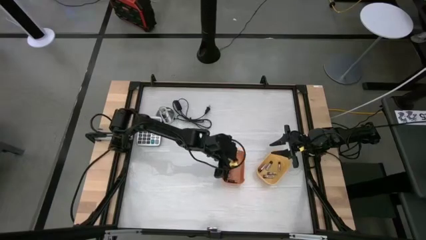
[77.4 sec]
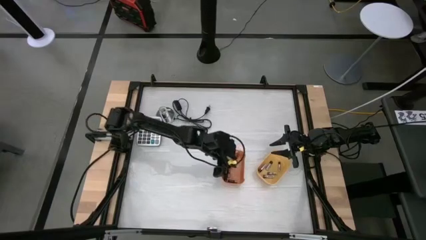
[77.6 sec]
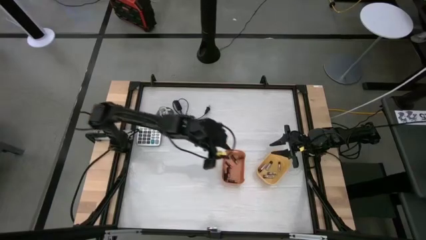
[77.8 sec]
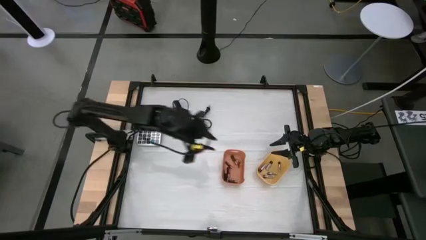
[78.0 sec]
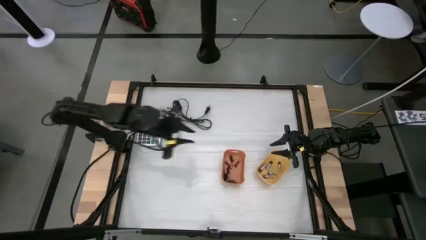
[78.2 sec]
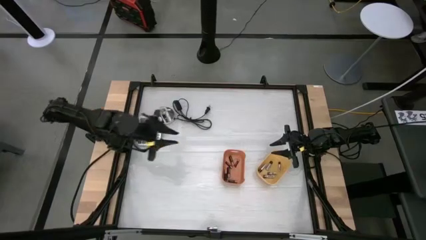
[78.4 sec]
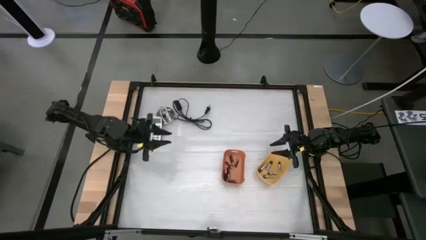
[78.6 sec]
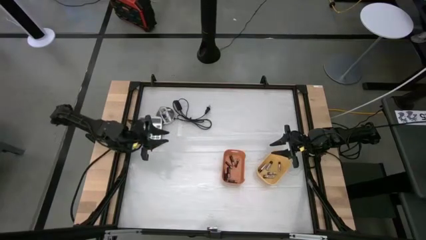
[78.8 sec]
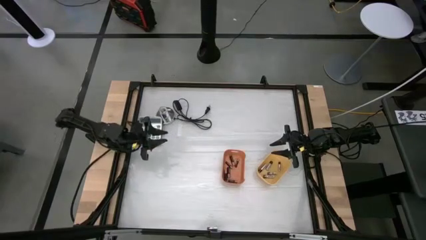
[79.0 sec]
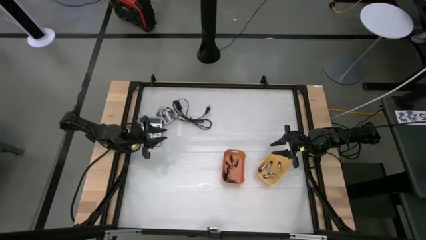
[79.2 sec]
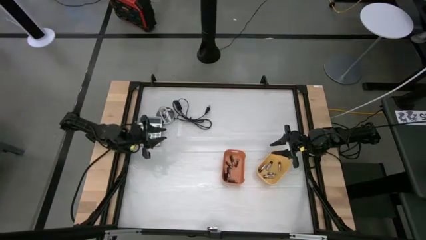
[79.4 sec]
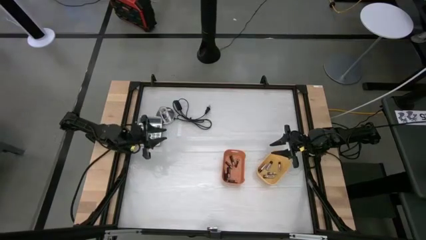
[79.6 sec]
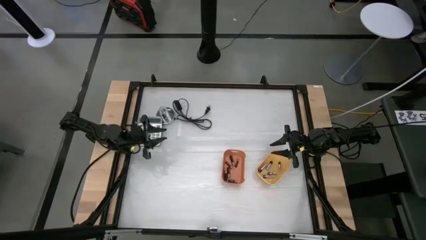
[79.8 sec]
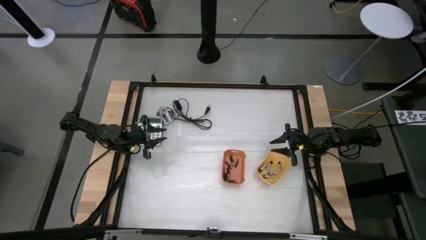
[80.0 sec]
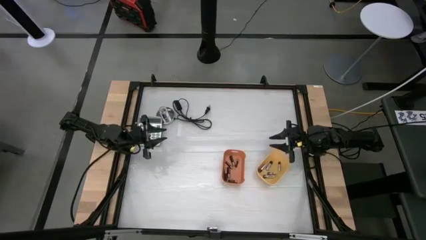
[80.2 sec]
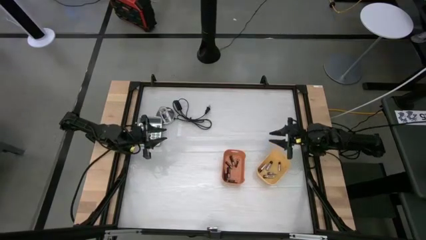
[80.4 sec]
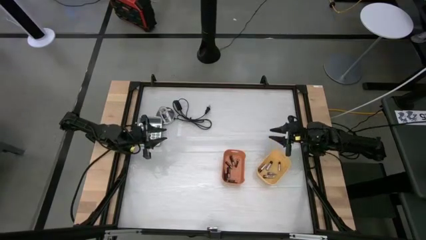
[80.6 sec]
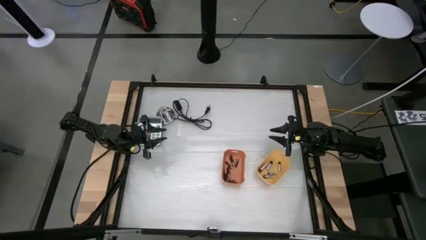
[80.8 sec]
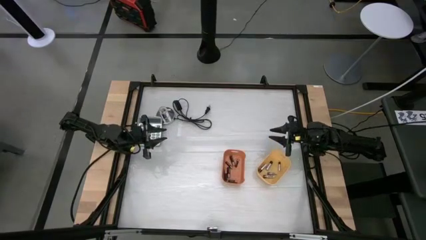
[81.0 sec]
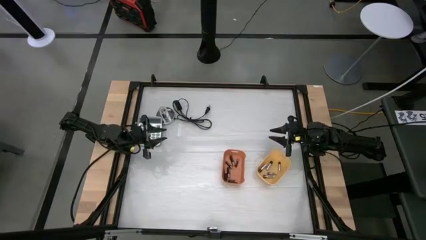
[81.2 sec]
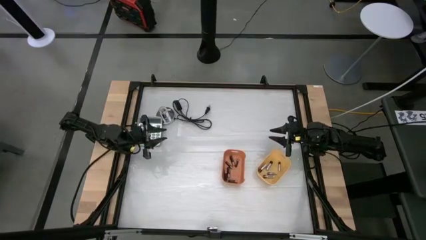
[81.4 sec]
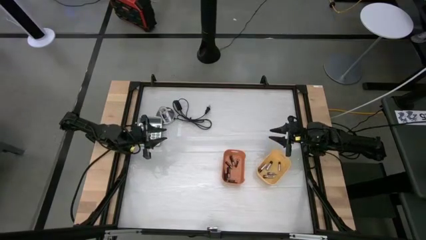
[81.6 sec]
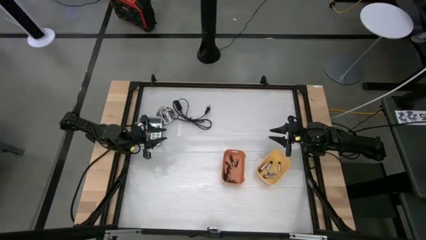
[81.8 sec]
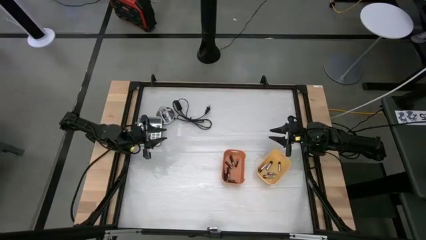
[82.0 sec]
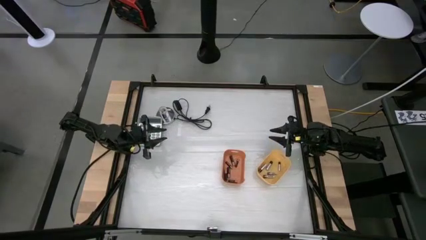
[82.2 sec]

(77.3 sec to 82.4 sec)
Task: Sort batteries
Return To Home Position

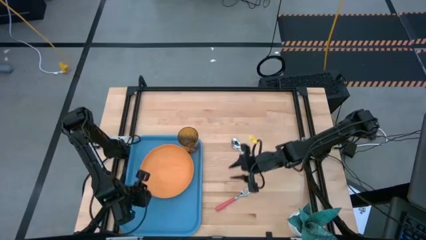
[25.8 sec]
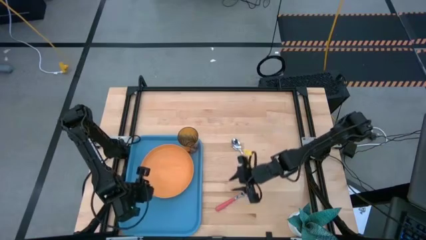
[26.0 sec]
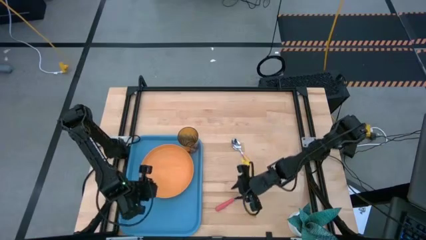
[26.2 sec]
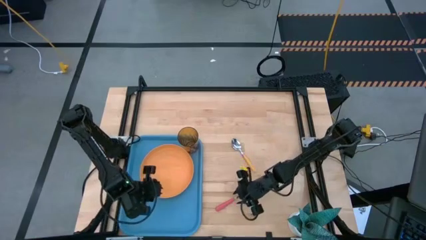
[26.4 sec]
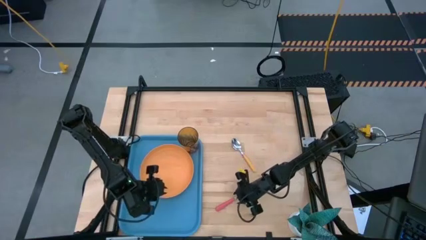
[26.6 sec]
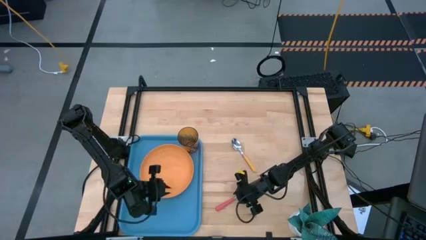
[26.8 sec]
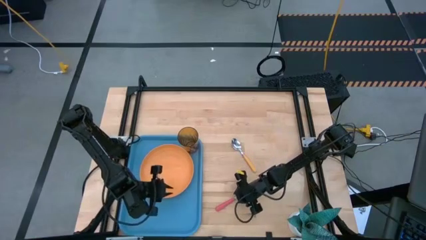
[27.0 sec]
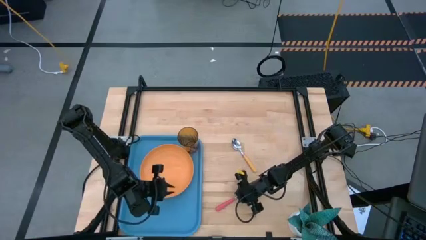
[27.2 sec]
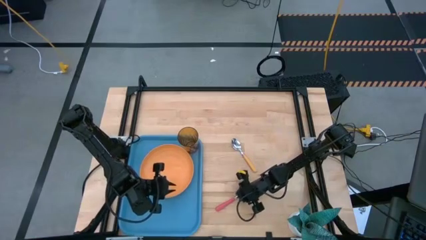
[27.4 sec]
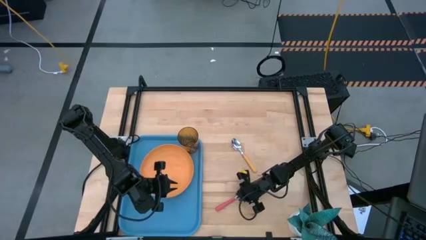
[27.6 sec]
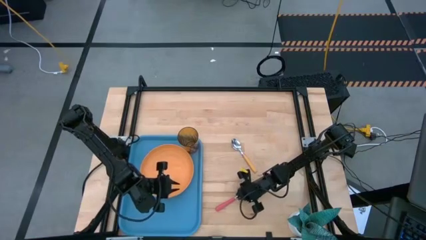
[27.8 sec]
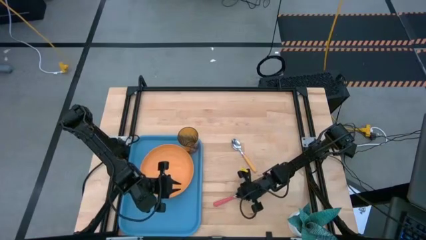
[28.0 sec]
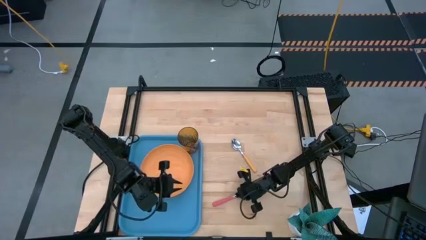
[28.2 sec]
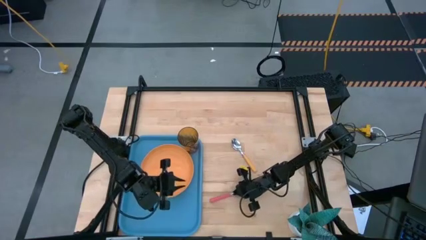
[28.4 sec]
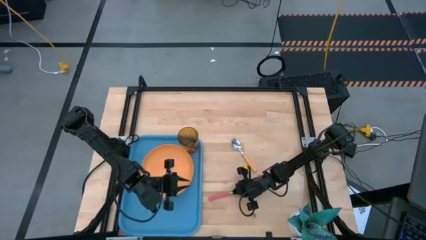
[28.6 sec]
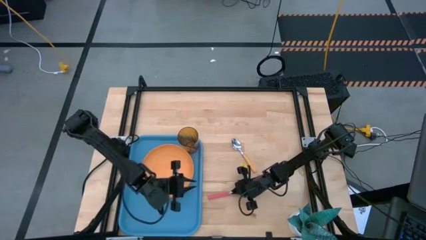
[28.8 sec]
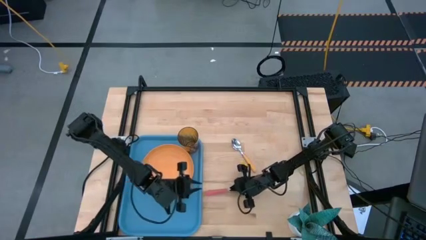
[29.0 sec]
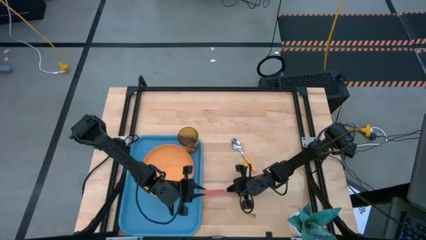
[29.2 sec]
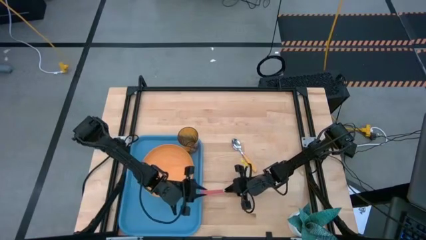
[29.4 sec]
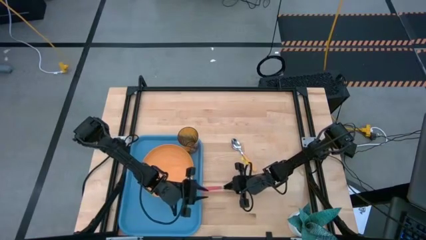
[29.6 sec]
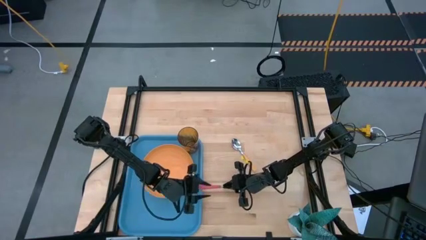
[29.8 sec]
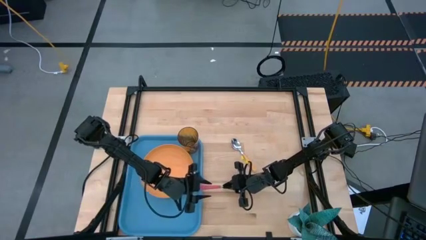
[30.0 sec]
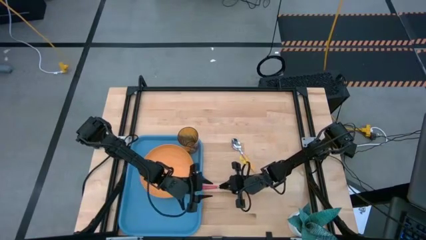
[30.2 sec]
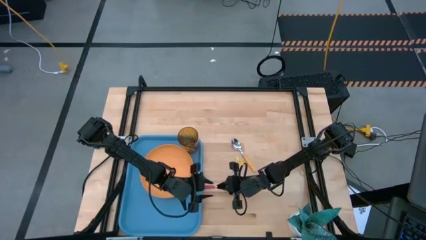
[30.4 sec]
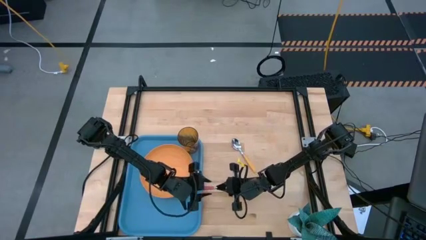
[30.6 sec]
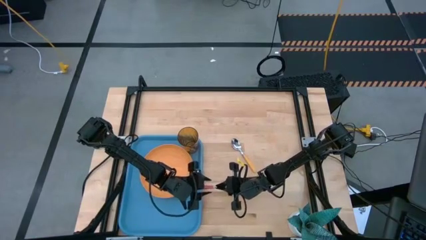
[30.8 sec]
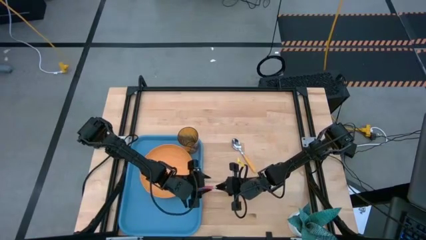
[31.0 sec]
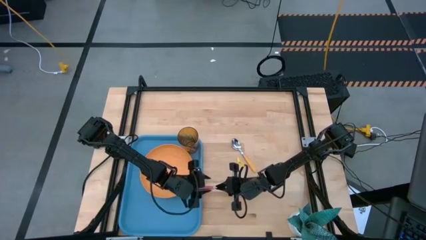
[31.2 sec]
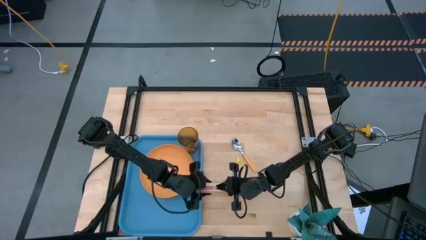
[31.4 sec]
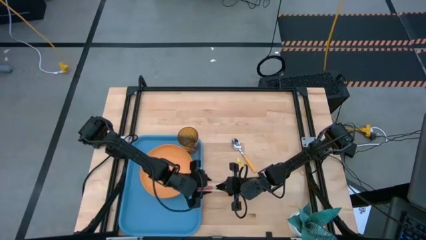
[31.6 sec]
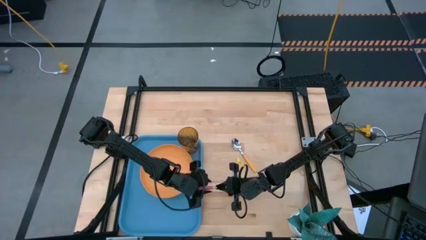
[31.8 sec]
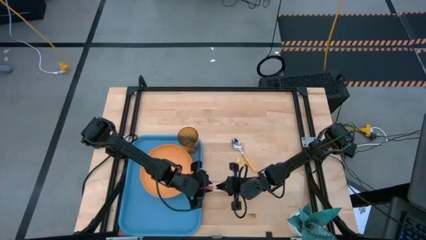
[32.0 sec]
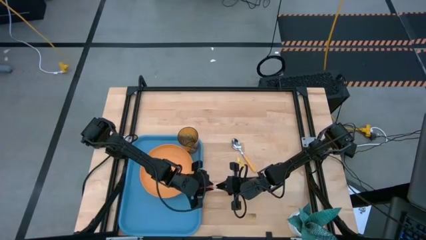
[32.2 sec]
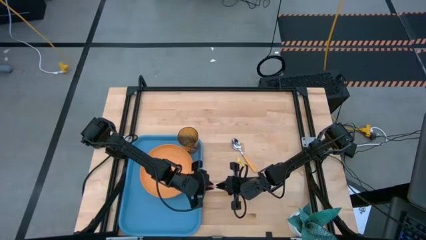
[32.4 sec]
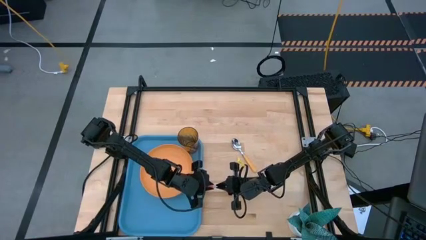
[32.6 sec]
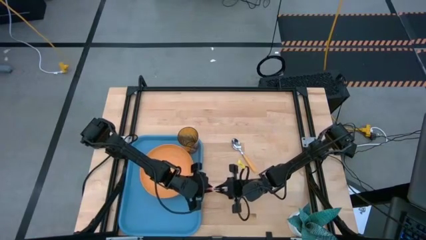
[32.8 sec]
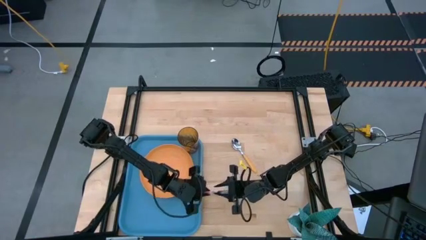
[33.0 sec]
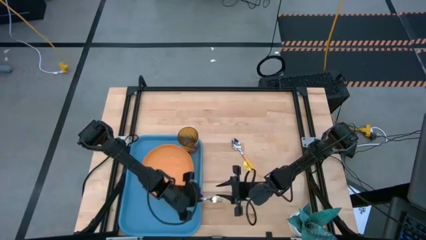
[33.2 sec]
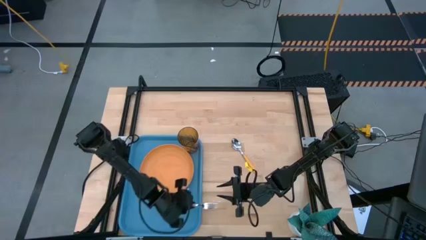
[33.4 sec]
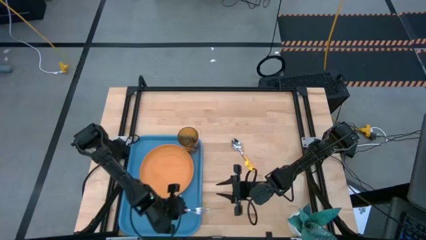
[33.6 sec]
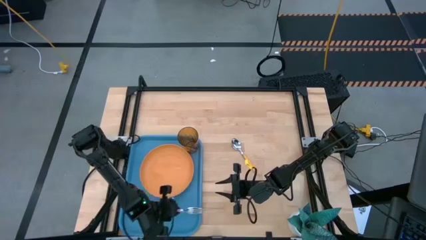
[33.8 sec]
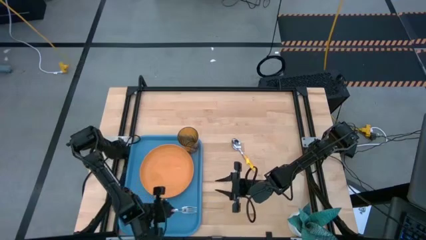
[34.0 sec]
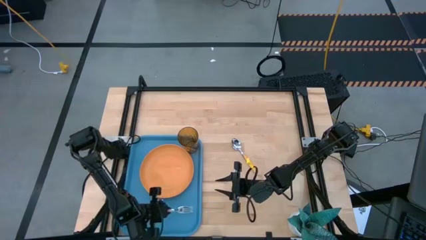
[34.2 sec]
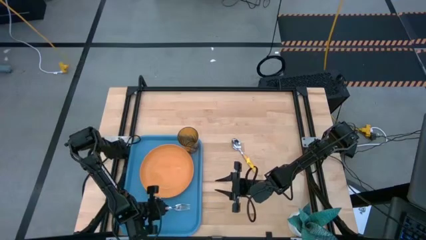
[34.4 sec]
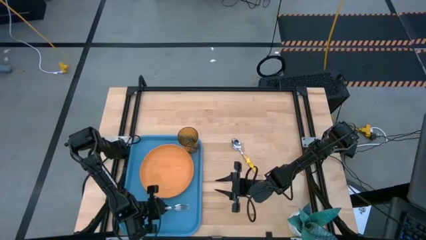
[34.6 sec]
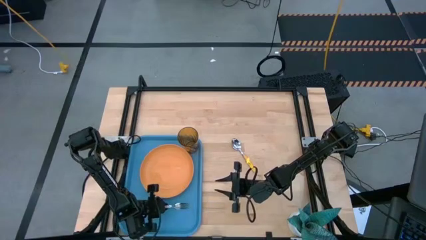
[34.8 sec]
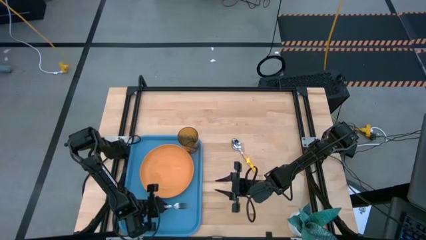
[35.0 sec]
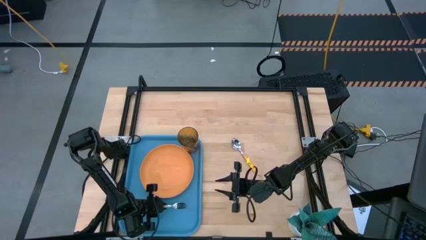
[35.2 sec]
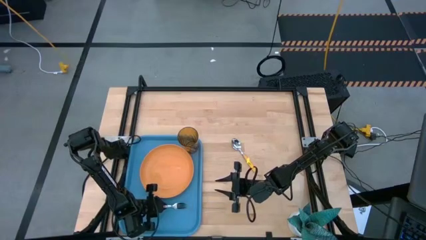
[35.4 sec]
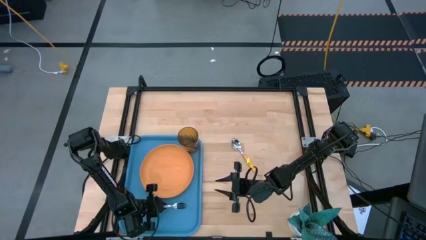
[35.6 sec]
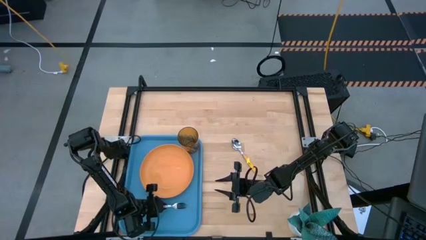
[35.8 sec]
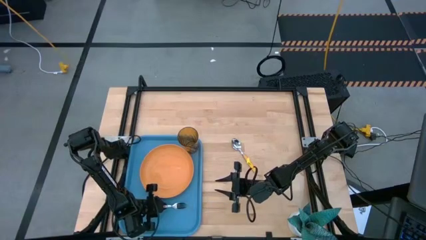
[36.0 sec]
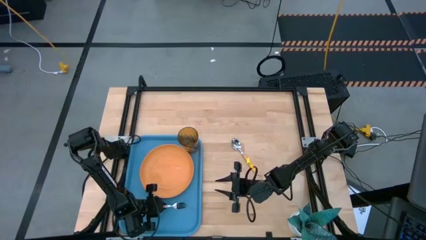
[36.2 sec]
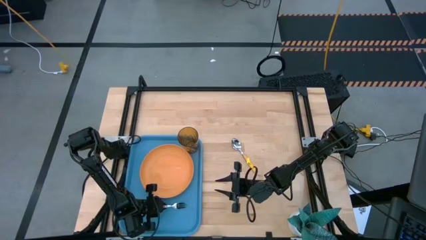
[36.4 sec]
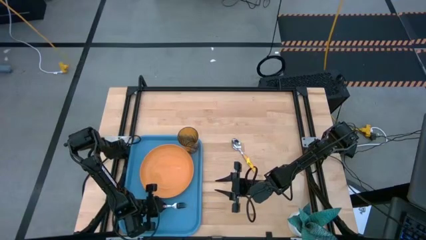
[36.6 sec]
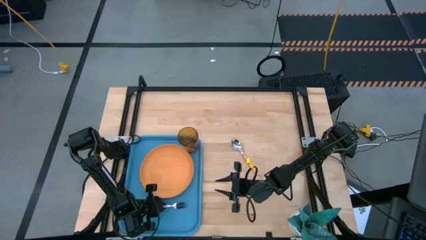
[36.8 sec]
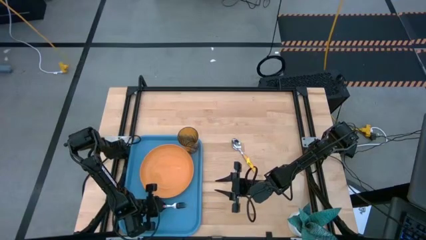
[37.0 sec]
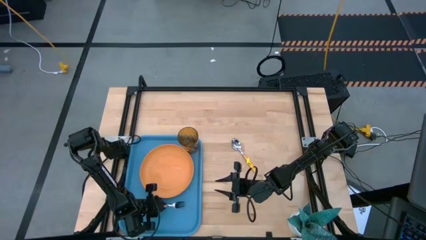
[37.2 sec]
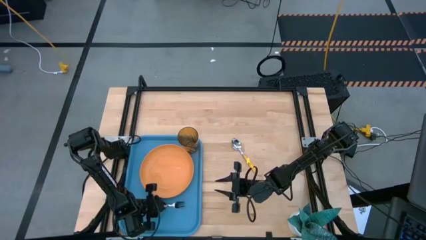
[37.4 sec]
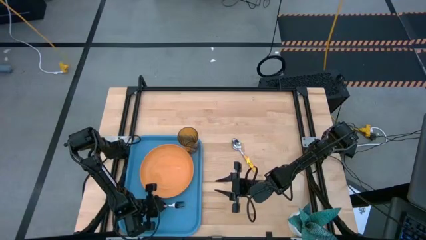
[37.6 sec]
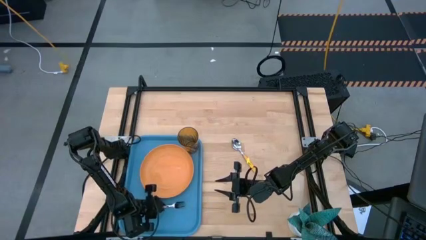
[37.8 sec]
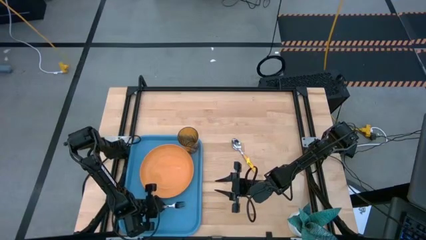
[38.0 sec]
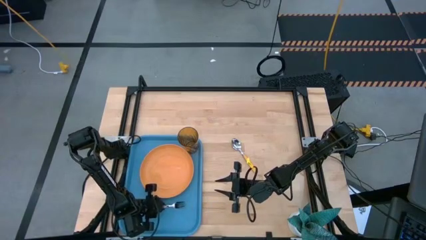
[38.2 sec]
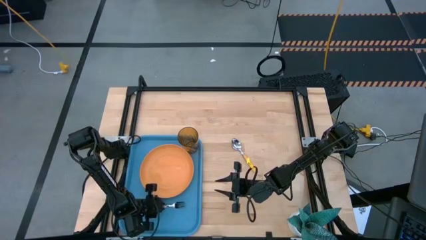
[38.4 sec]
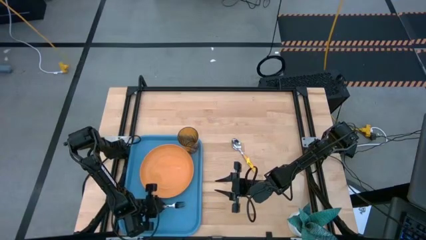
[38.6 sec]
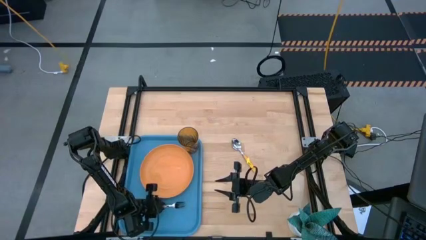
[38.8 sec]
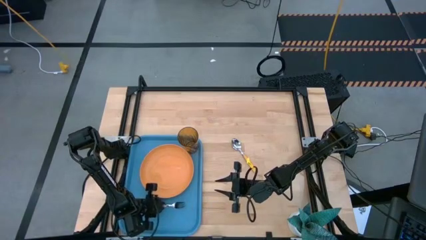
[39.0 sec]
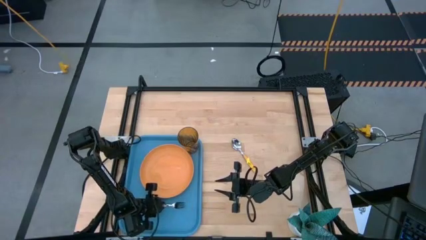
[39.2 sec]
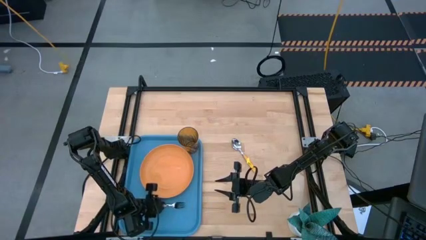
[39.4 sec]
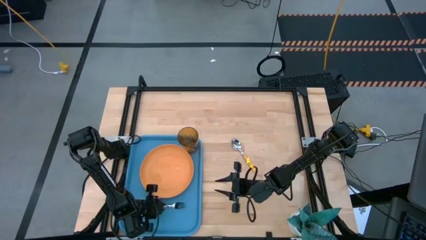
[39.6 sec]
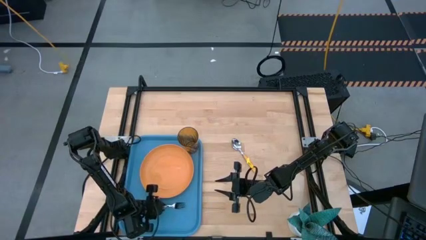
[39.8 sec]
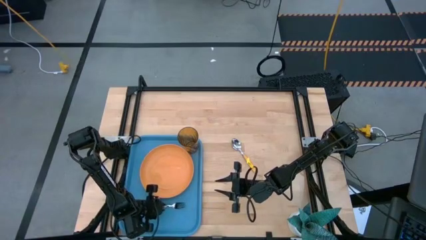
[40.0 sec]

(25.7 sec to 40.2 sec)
Task: Pick and place plate/cup/fork/spoon on tray
Put the red fork on the blue tray
